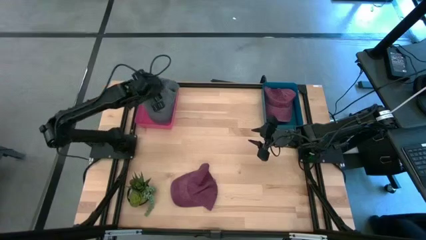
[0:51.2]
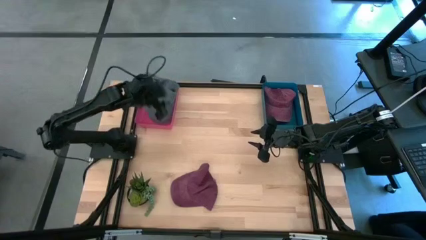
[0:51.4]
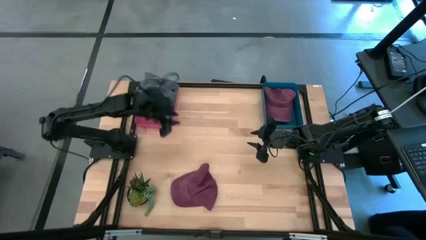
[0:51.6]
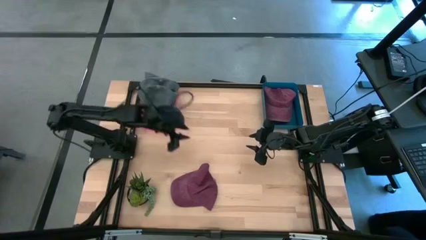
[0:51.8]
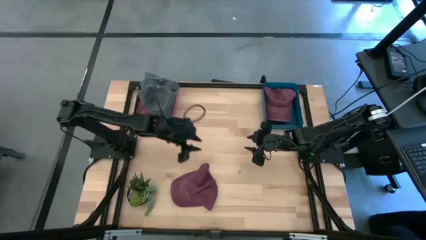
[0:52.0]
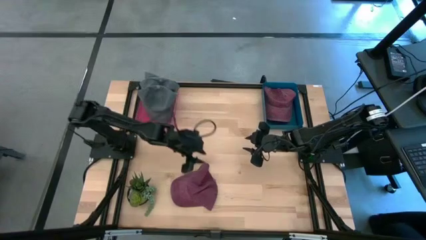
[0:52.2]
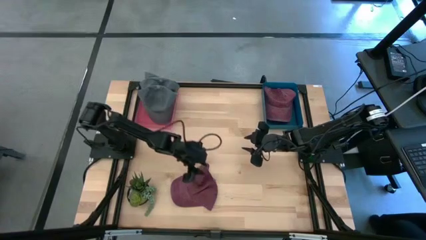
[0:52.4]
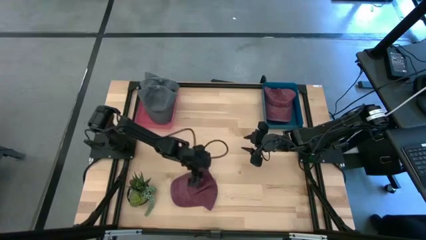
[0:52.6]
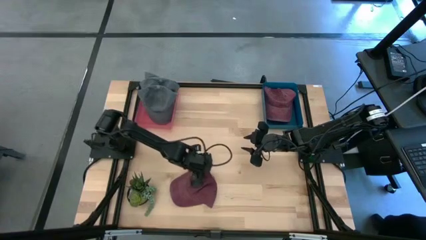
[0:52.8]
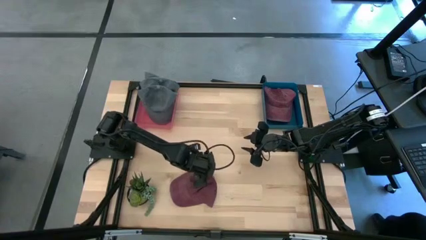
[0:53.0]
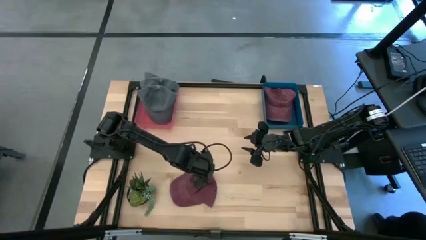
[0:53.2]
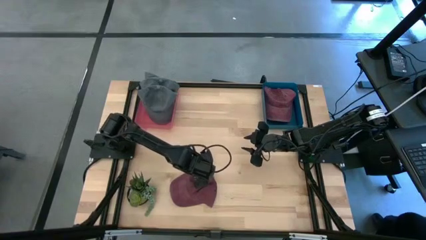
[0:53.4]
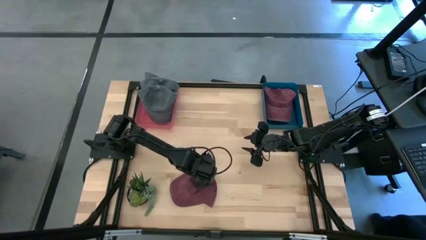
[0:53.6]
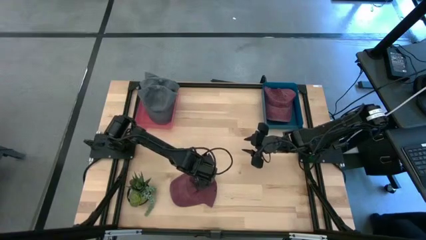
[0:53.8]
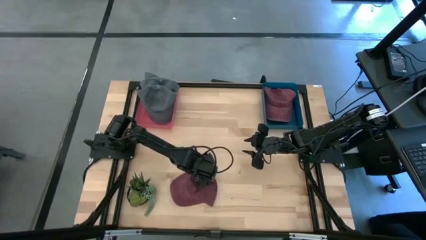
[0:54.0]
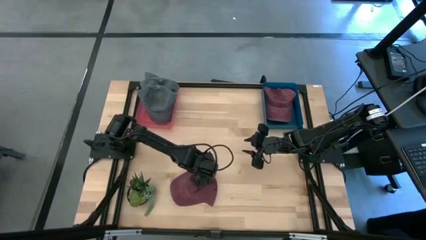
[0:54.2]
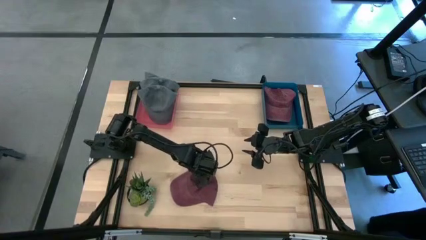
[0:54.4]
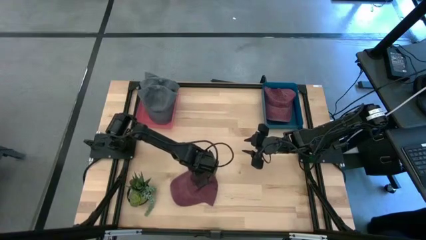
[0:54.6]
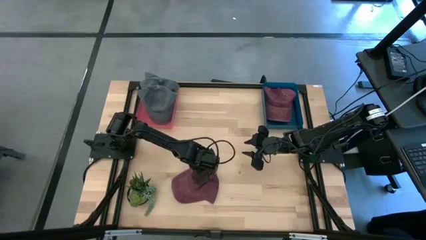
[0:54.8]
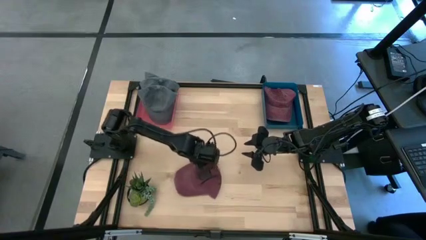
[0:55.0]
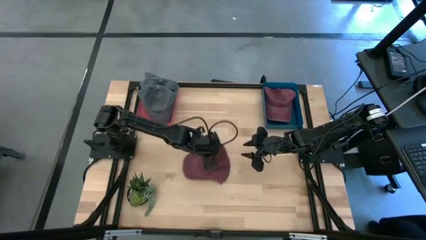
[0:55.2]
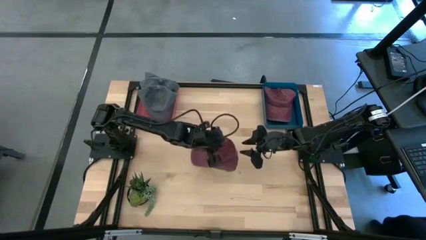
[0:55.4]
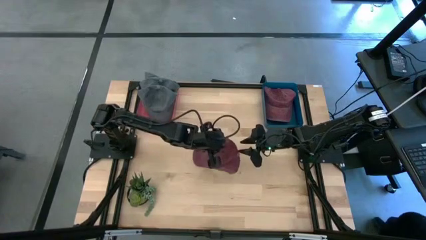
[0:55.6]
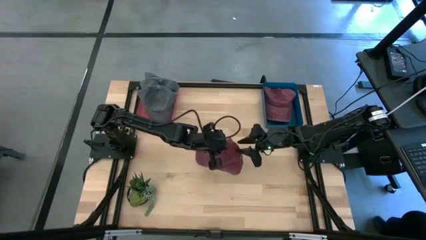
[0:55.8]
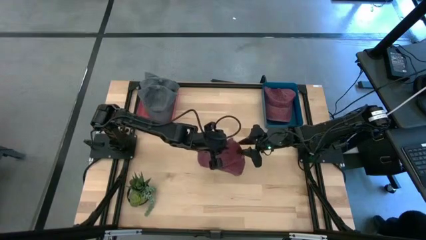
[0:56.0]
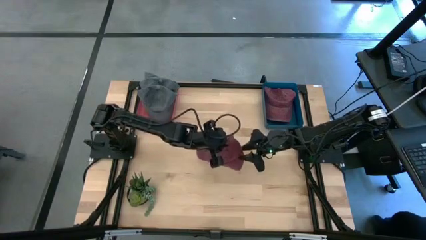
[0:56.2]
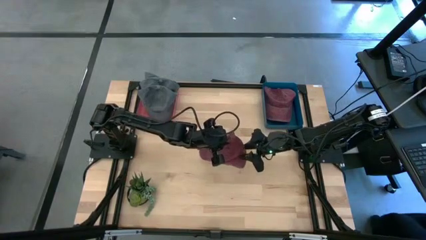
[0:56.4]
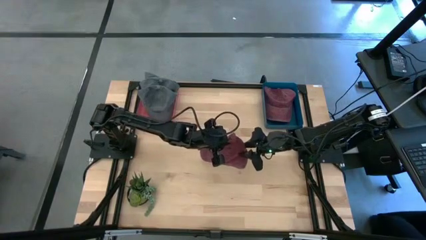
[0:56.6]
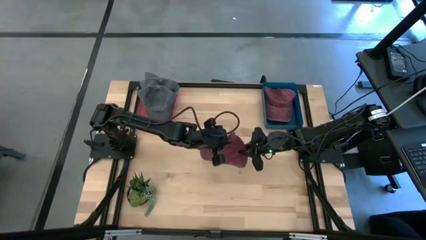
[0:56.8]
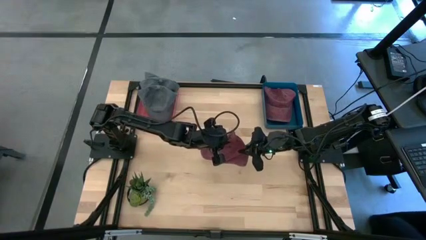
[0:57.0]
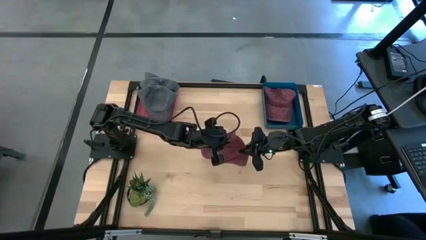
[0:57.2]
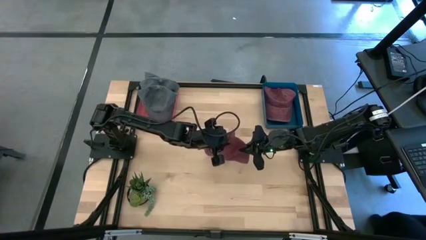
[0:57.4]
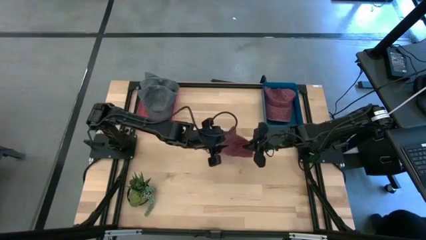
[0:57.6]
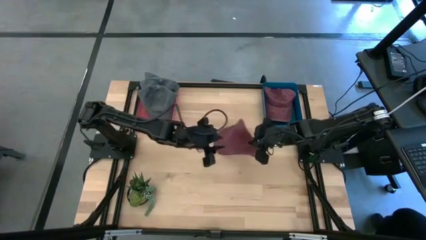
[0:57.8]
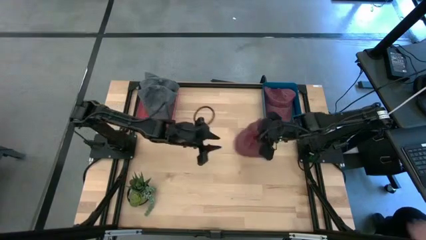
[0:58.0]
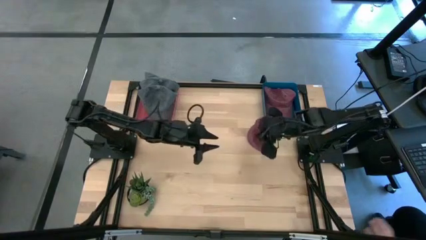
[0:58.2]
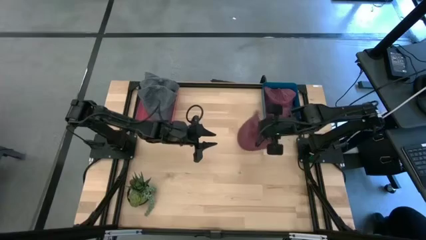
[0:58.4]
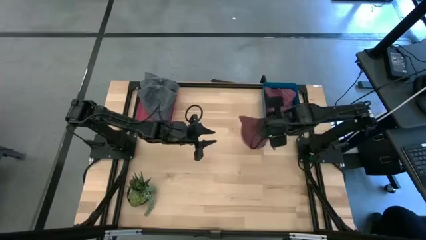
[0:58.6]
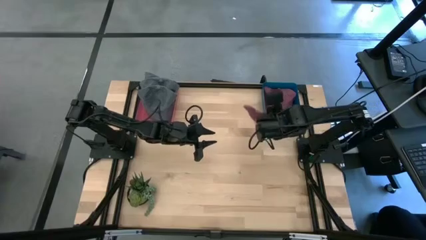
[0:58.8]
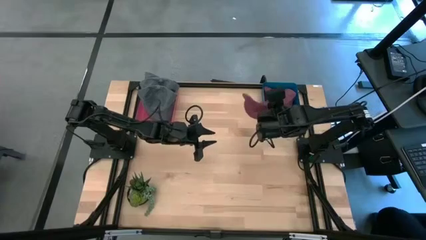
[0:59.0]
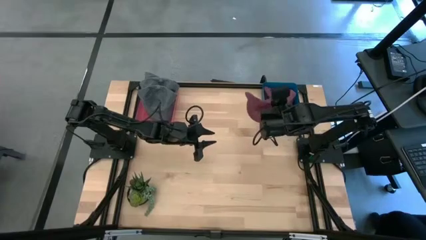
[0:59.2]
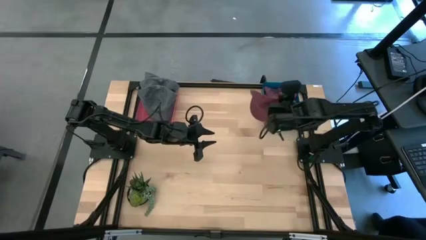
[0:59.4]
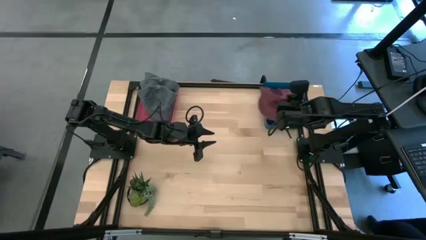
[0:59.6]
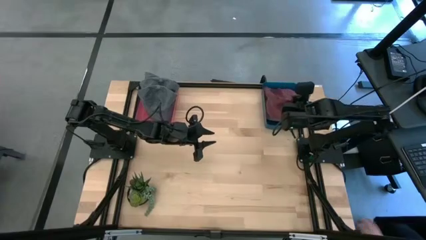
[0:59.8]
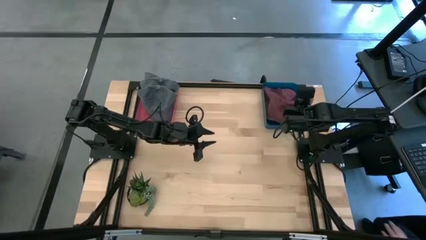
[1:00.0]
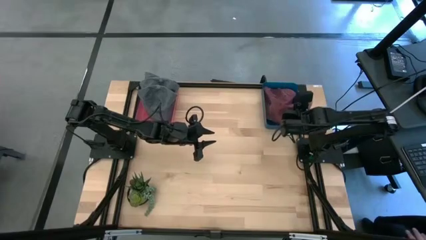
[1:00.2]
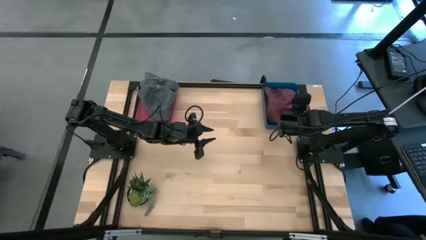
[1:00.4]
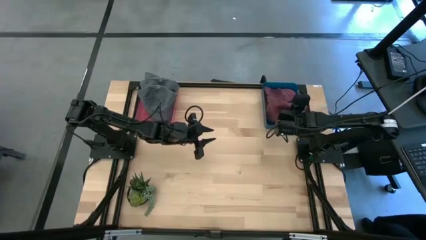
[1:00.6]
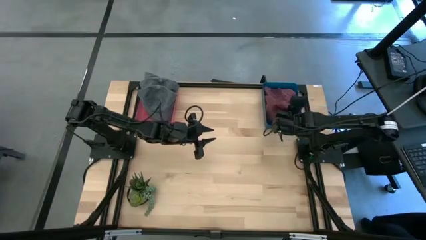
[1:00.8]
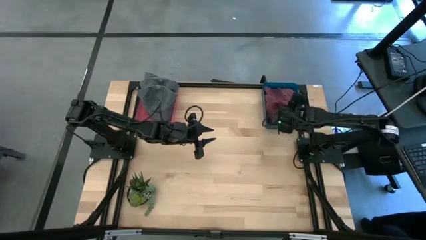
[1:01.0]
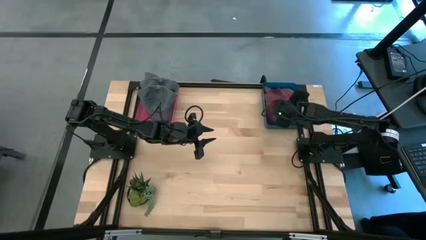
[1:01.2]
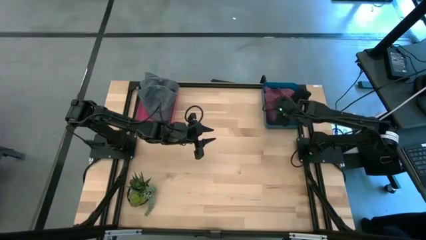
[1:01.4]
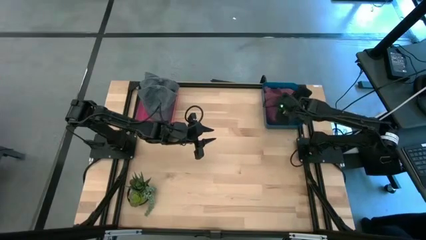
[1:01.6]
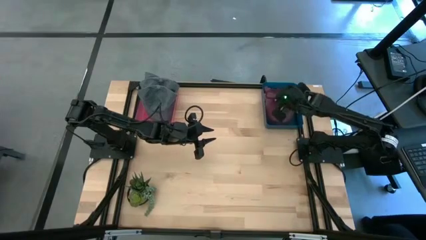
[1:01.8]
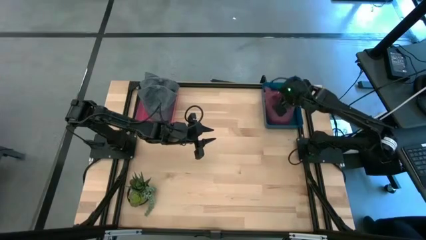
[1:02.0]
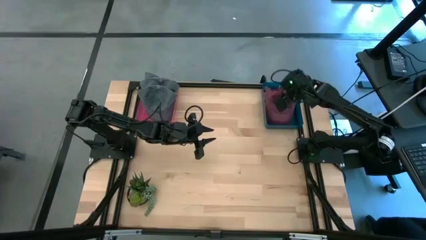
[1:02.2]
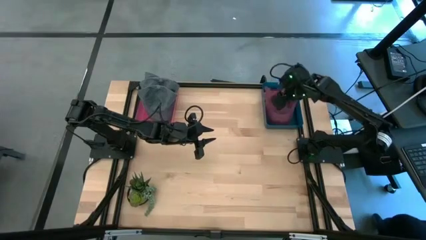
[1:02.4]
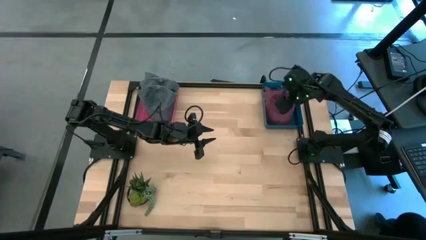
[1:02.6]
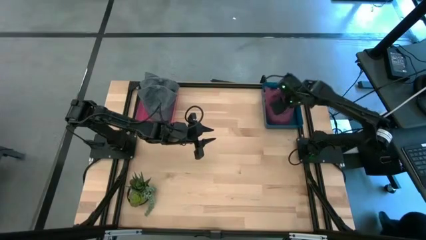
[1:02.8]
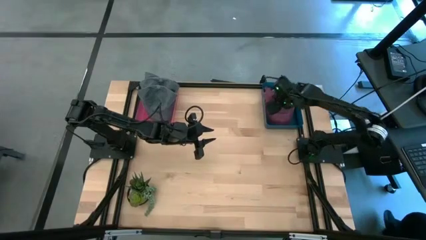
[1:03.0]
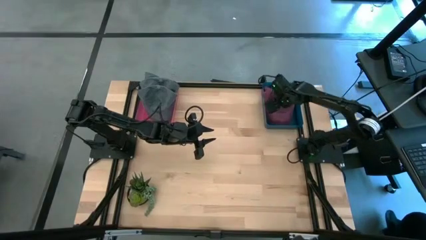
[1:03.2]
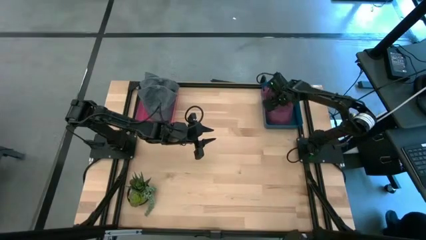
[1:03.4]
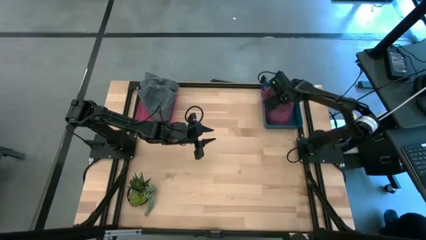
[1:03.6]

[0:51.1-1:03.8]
Task: Pick & Place hat
Put the red cap into the blue bin

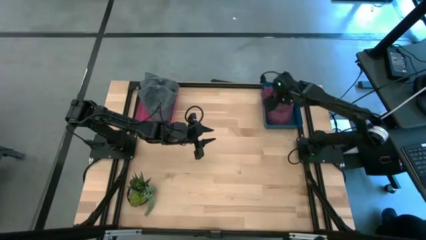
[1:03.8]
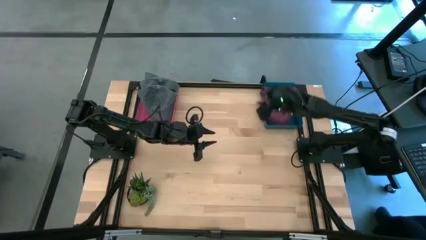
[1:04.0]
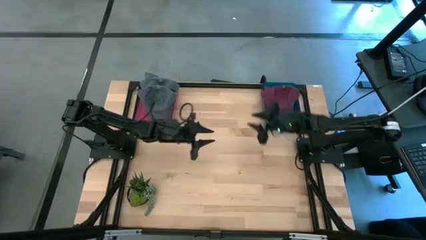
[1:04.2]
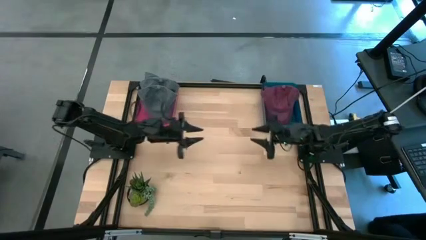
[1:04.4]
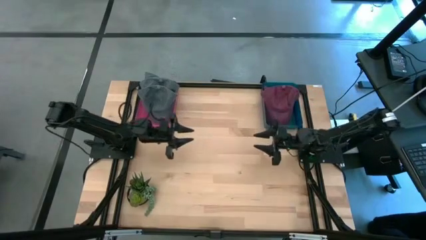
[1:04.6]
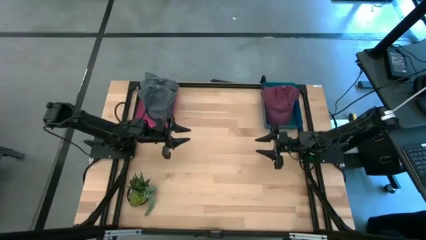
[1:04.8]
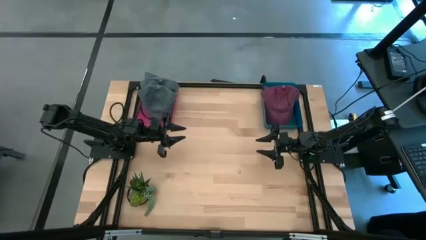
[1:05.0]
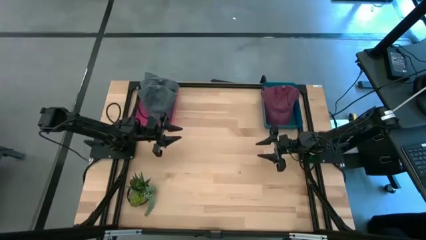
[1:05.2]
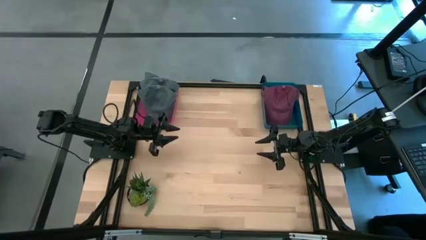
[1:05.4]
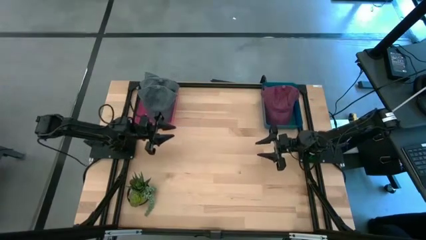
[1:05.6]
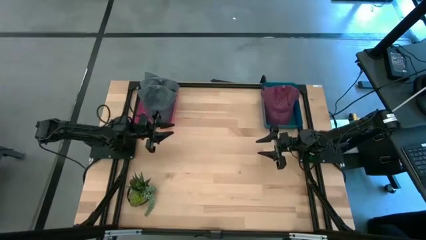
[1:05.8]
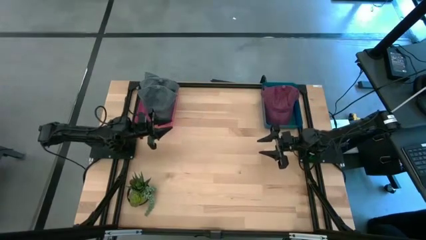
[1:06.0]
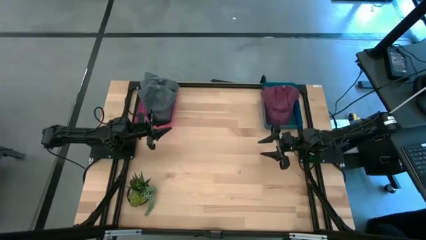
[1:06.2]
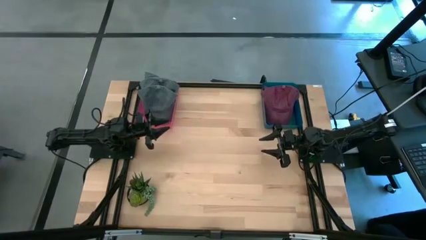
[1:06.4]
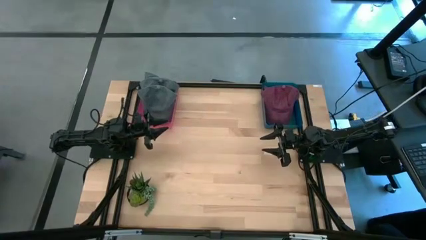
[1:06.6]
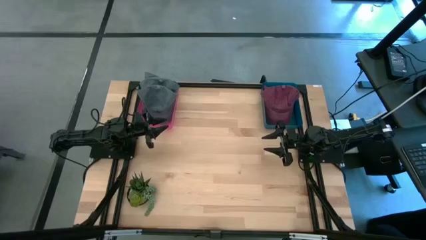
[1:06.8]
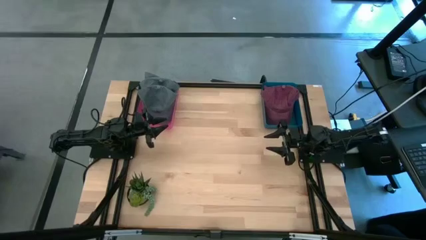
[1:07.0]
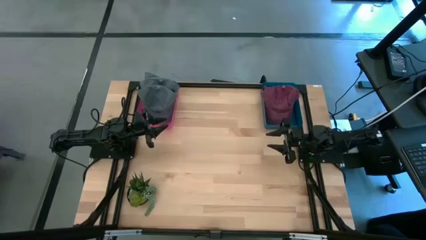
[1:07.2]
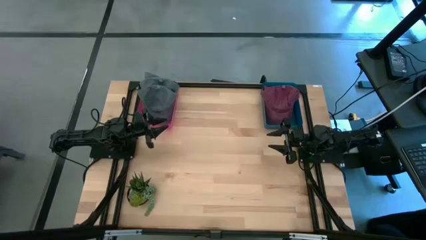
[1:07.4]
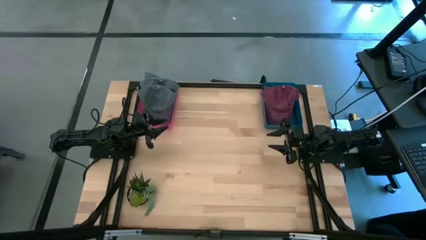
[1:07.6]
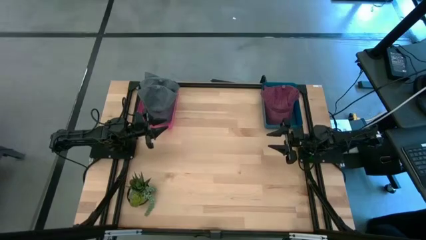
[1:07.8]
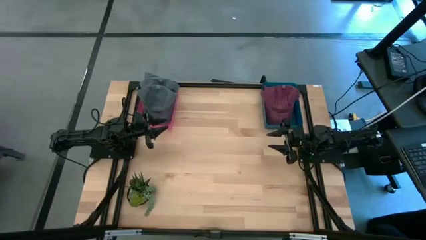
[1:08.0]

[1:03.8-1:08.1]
Return to Home Position
